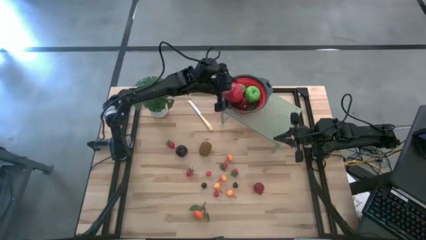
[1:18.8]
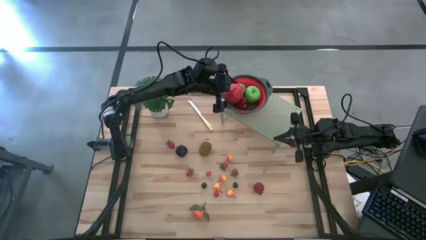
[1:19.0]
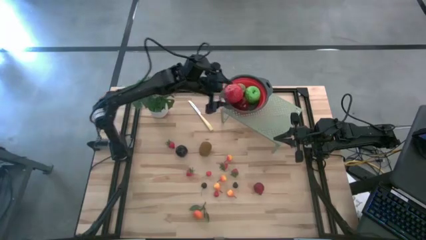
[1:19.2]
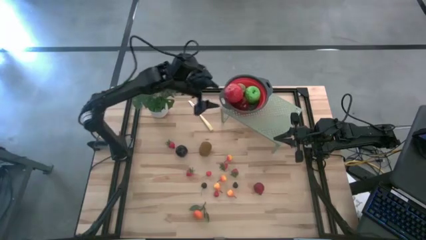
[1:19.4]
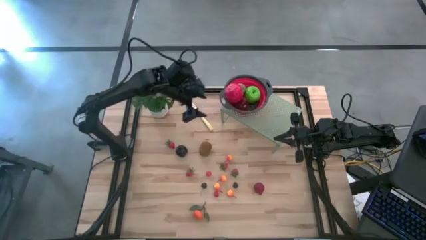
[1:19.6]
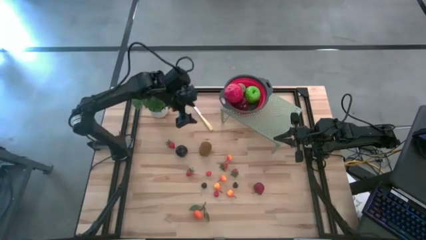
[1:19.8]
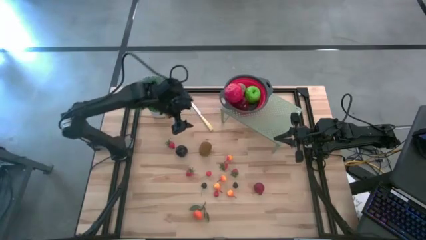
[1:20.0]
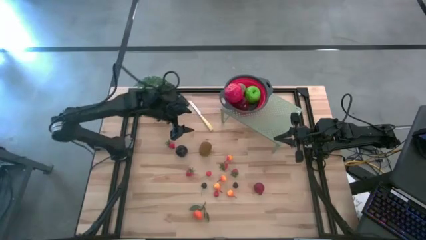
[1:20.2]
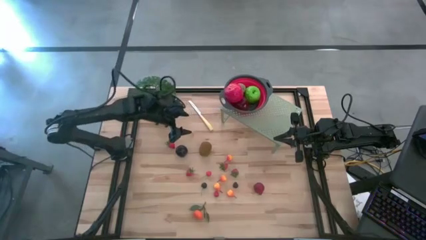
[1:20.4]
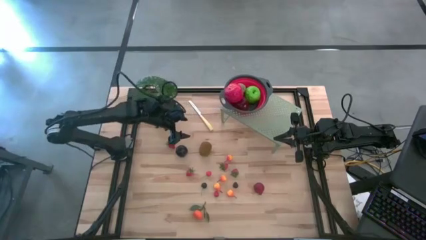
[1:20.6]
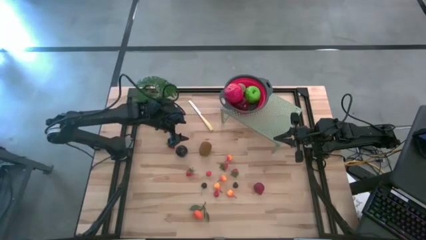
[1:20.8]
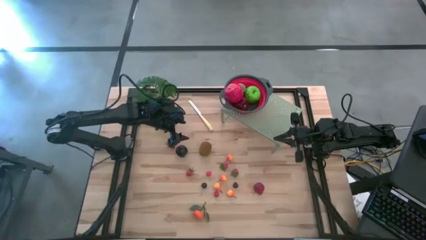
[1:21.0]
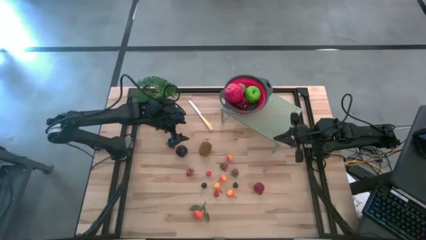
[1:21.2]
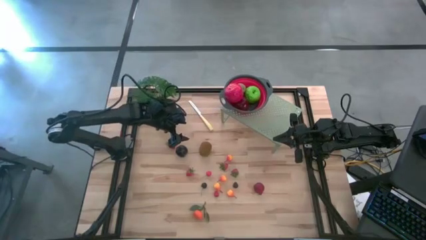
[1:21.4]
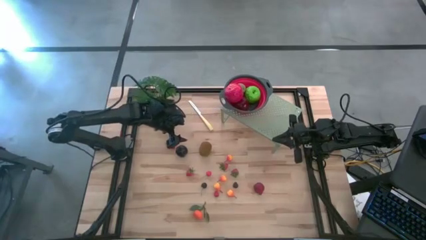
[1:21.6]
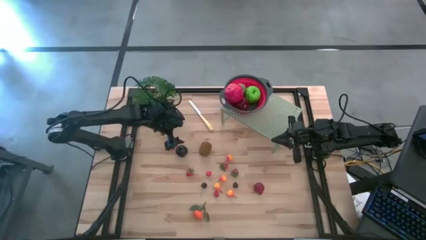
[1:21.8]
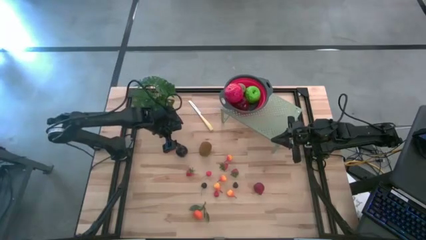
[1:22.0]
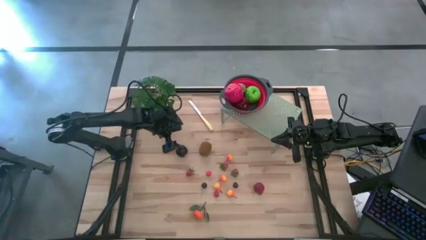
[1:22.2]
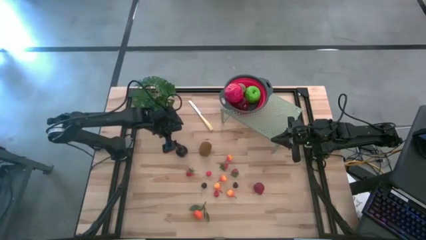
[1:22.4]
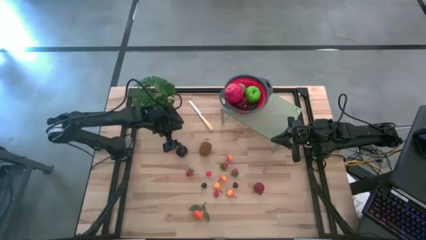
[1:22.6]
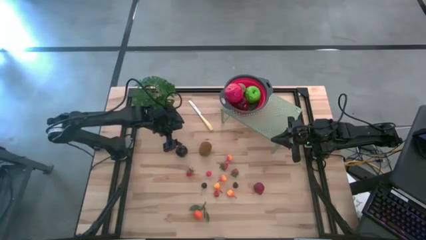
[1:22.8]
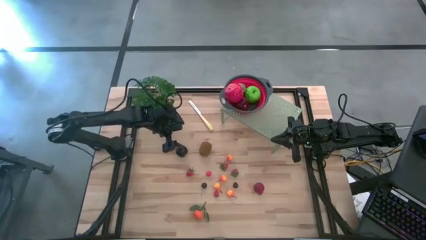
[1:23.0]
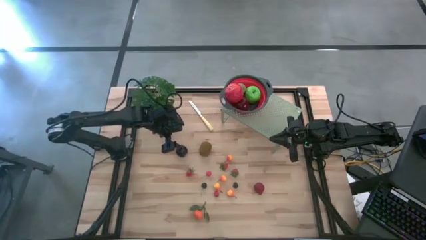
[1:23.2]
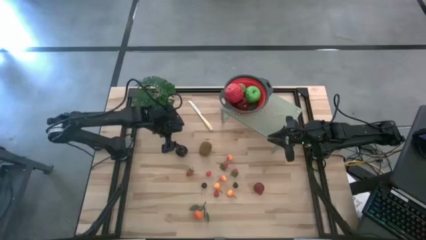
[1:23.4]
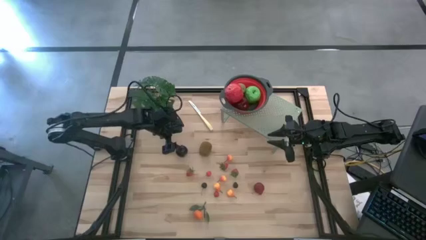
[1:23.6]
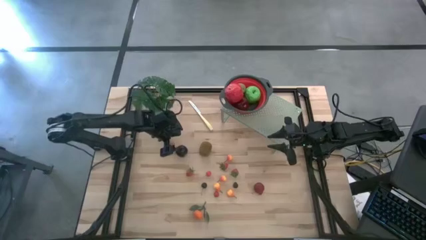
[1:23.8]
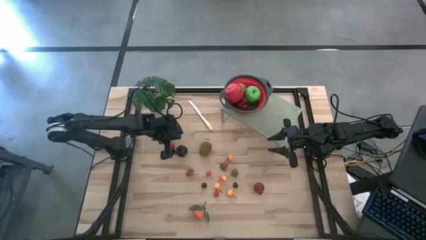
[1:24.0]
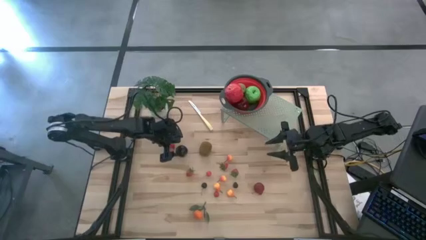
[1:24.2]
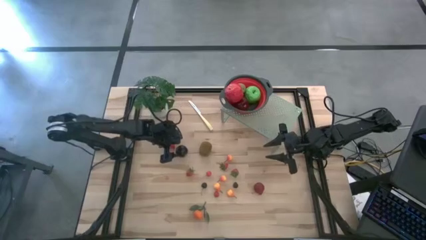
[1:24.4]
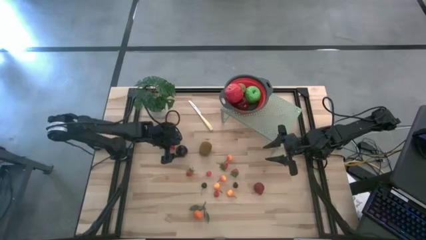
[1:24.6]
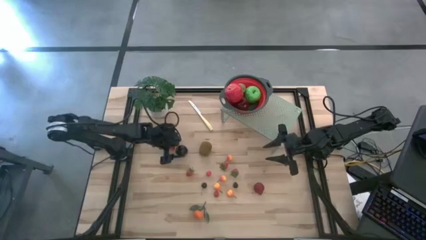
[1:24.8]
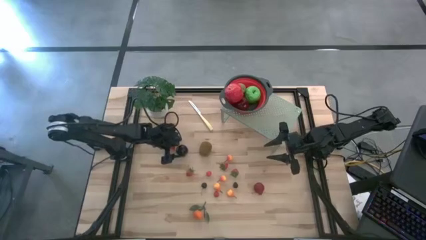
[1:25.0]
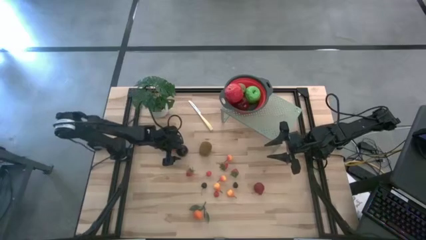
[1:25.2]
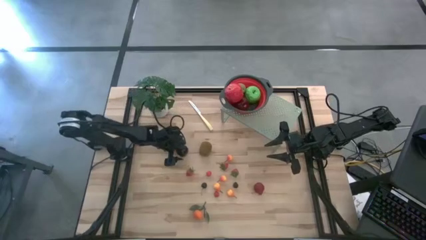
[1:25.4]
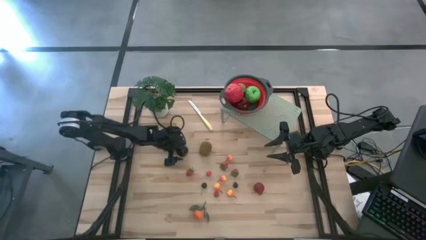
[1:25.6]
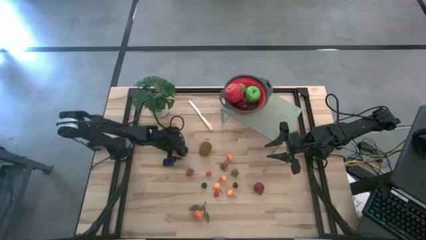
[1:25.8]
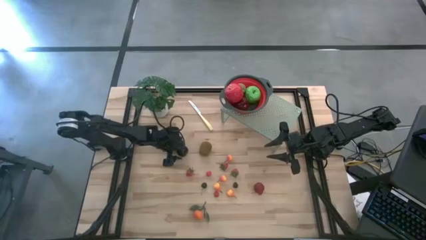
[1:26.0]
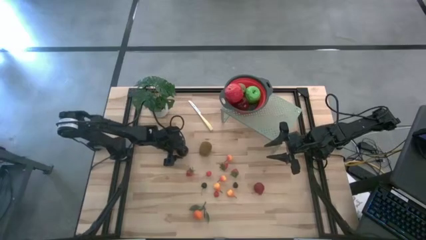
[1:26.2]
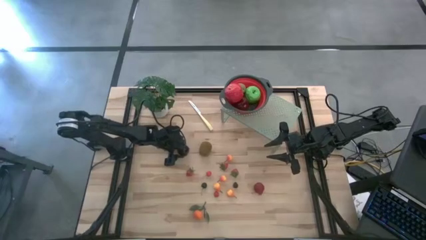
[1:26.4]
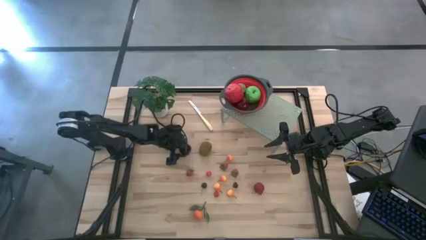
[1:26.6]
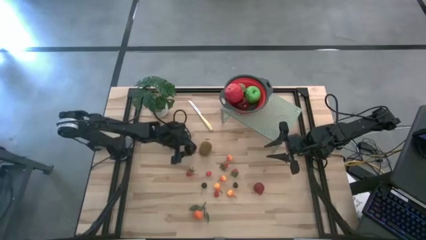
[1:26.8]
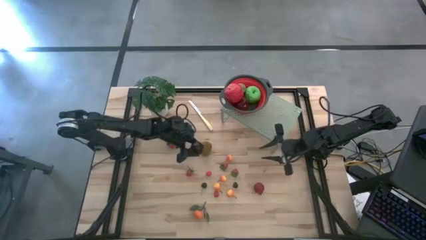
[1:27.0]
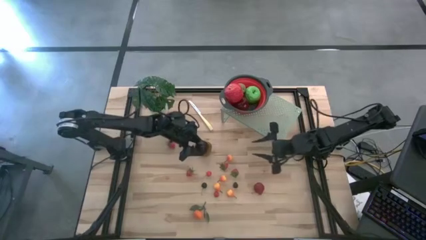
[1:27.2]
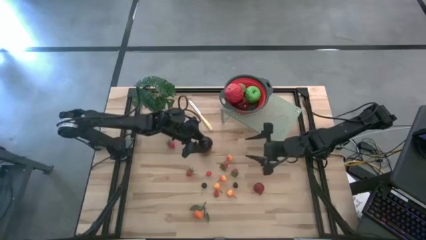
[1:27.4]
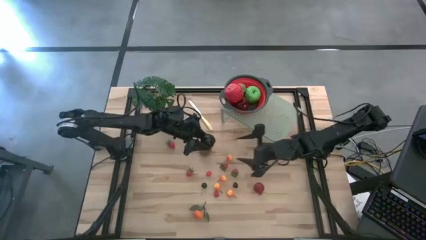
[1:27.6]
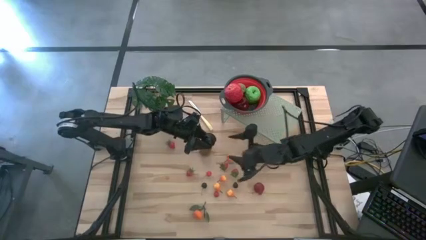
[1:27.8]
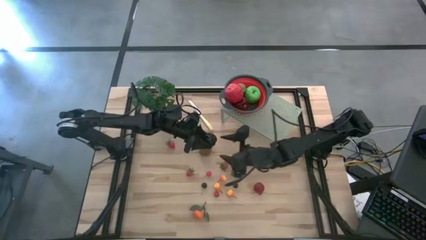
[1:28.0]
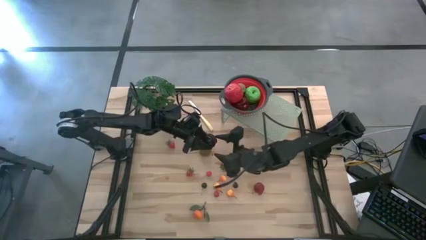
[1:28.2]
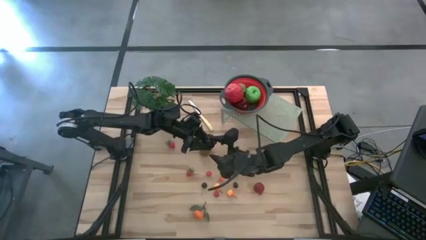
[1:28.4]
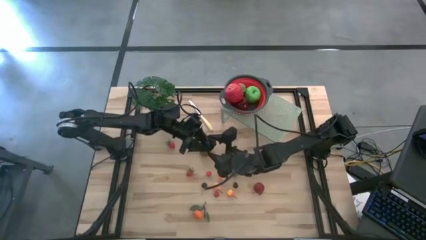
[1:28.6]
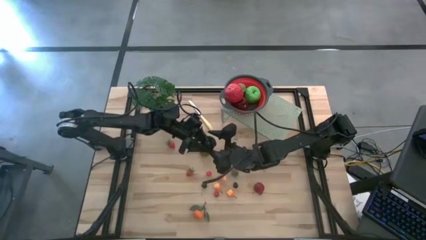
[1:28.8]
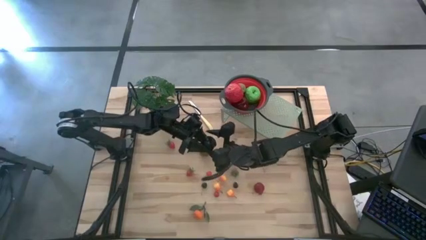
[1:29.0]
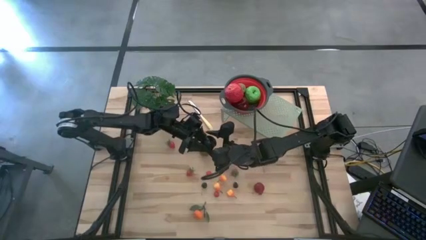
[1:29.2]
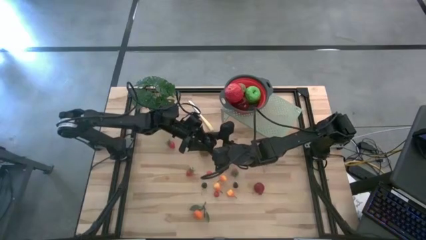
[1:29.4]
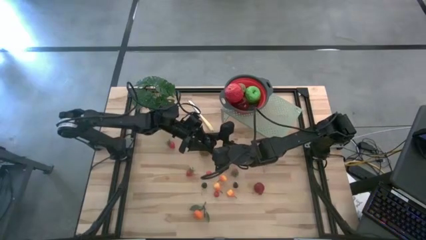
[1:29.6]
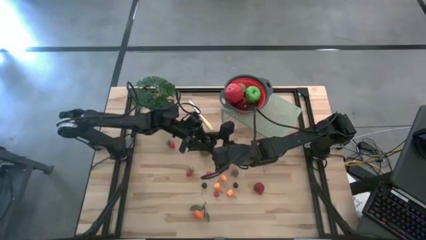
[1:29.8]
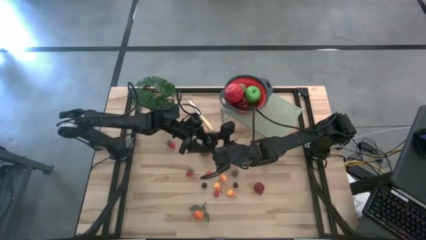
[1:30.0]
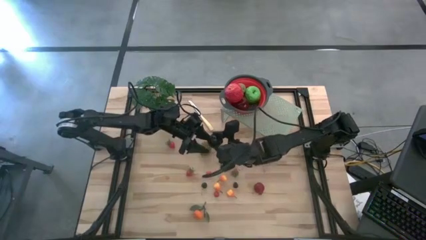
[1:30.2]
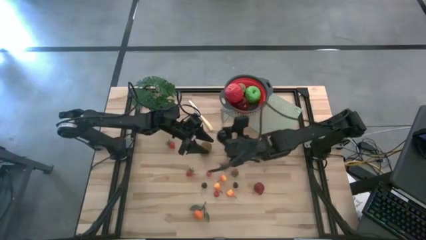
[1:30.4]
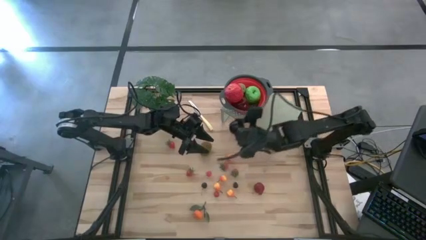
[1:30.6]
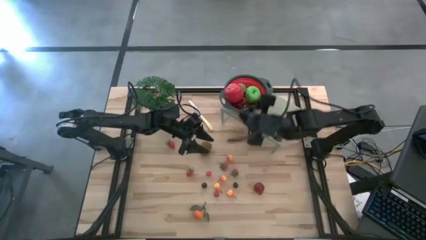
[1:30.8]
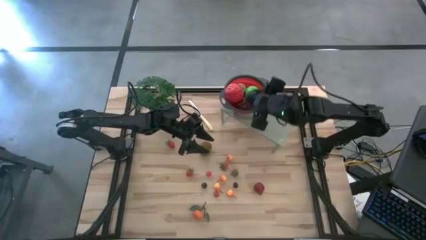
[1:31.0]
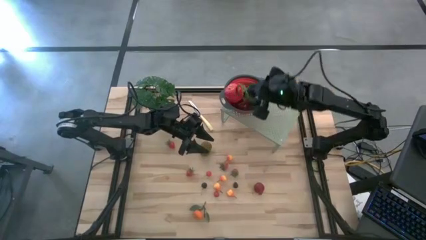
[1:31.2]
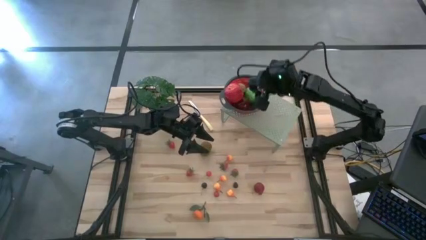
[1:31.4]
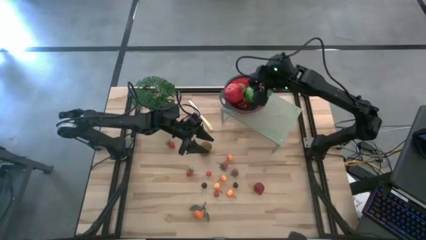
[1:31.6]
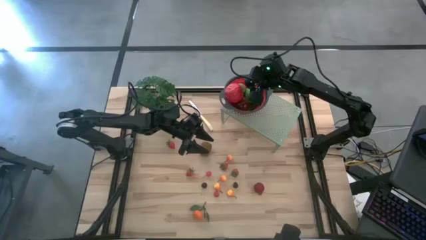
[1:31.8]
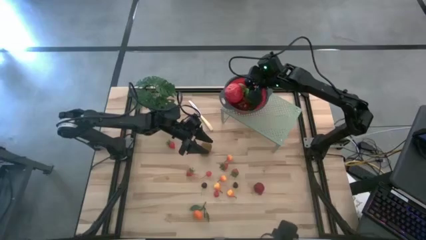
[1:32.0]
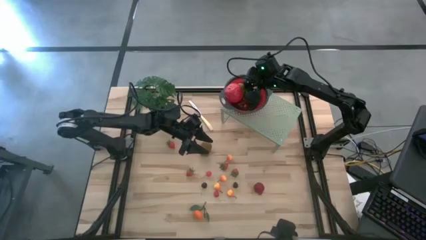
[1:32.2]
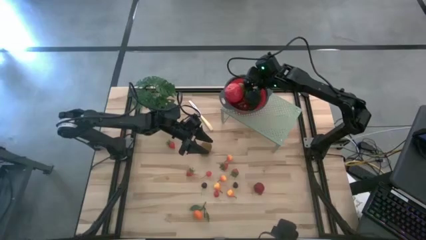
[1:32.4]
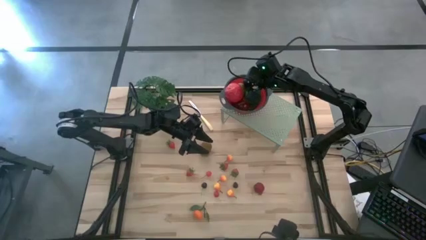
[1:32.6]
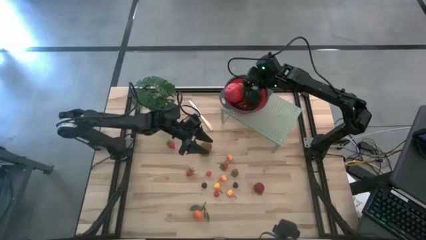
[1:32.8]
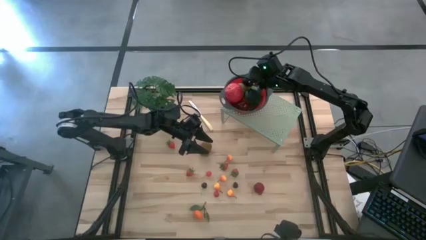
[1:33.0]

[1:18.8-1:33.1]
Task: Pick & Place Fruit
Put the plum into the red gray colander on the shelf
